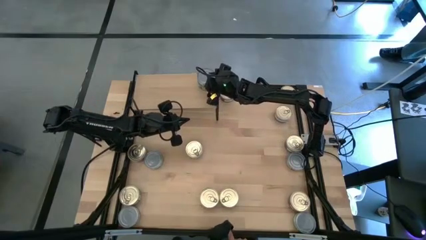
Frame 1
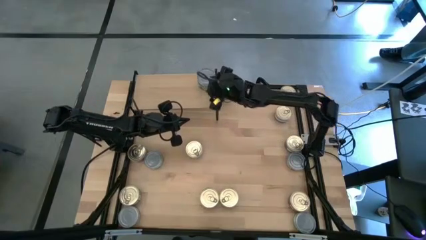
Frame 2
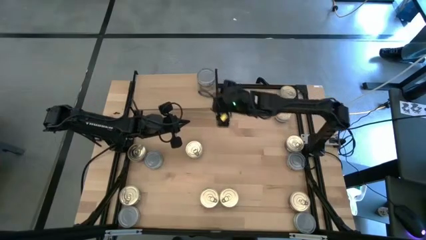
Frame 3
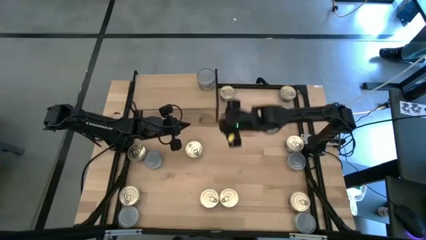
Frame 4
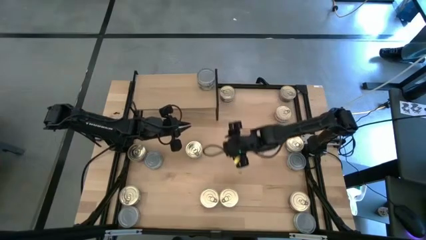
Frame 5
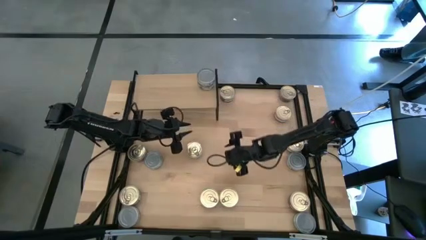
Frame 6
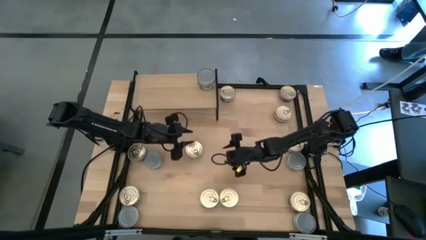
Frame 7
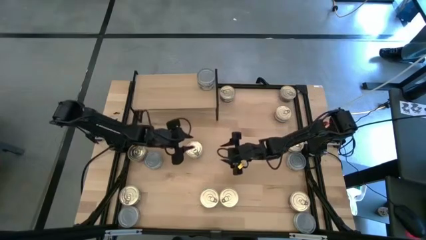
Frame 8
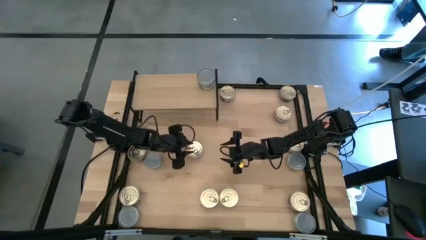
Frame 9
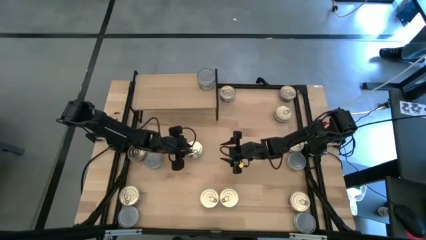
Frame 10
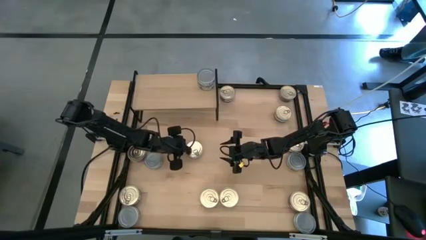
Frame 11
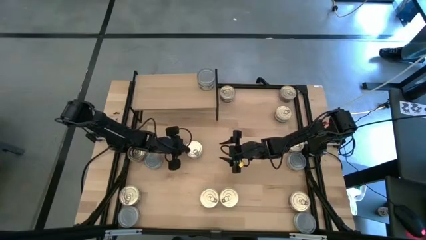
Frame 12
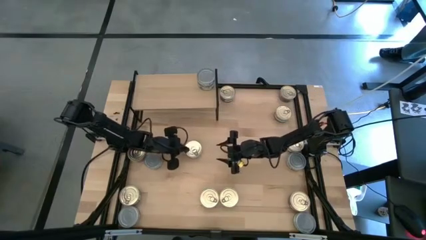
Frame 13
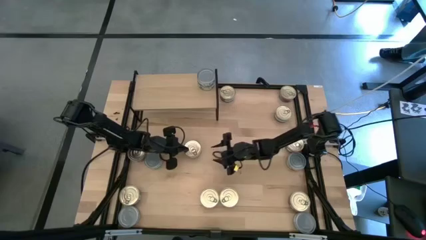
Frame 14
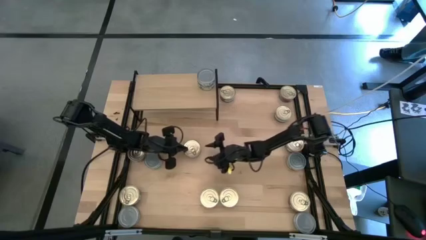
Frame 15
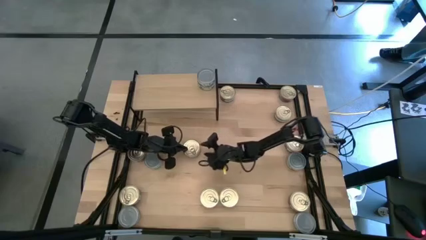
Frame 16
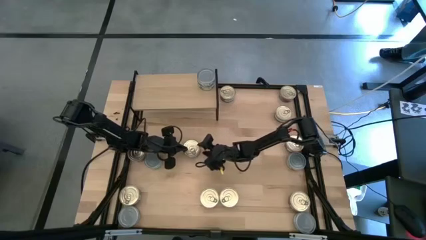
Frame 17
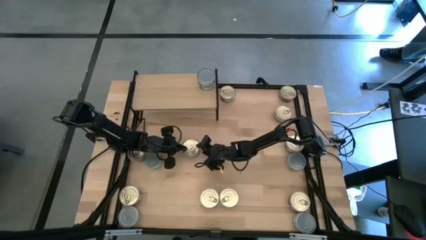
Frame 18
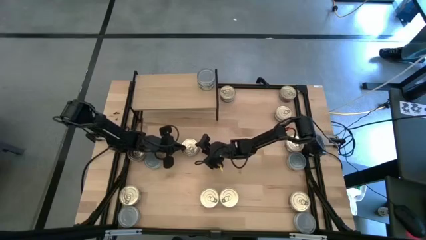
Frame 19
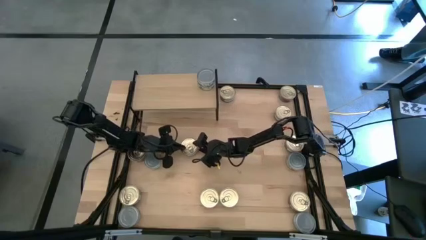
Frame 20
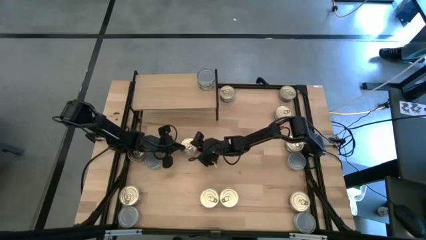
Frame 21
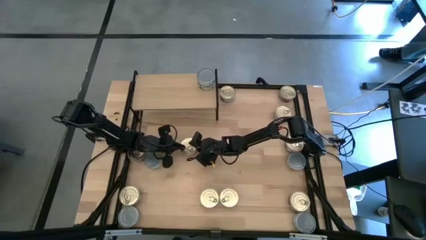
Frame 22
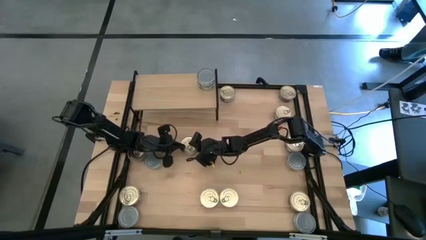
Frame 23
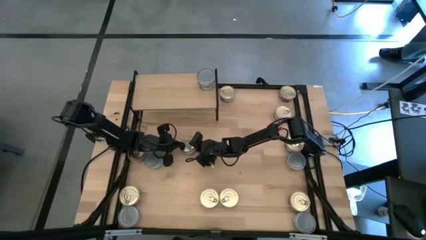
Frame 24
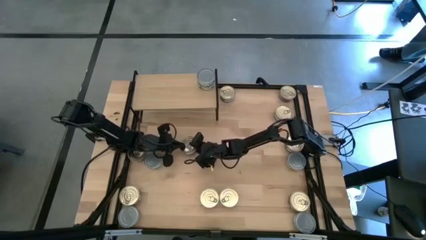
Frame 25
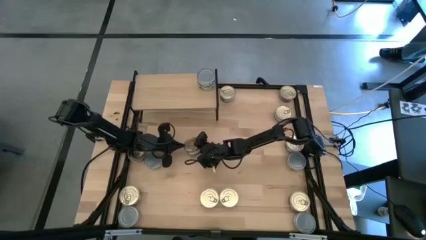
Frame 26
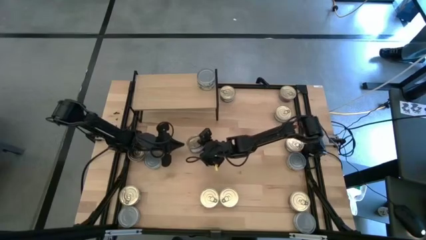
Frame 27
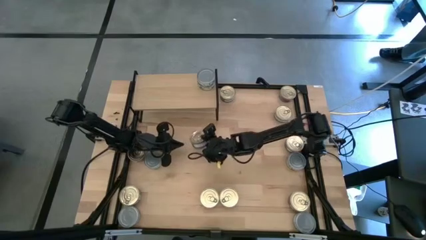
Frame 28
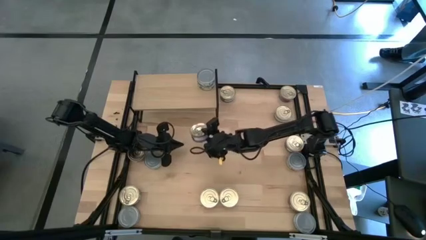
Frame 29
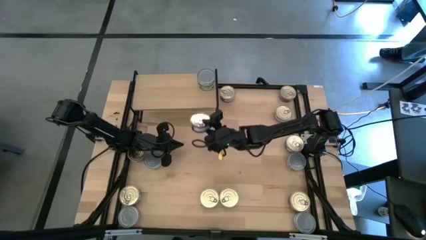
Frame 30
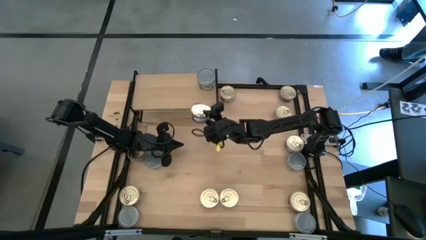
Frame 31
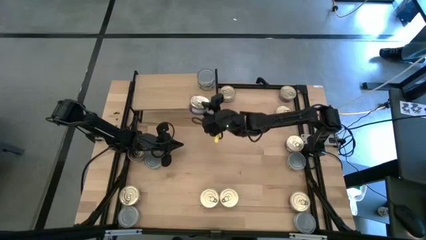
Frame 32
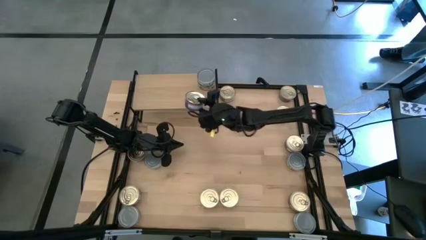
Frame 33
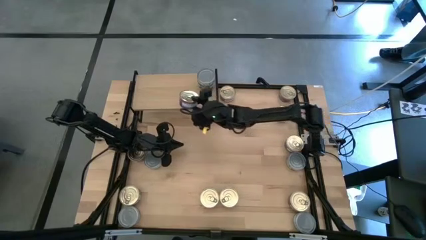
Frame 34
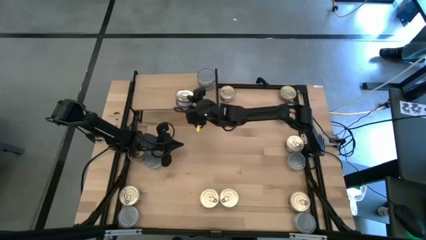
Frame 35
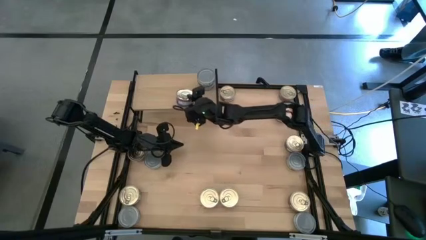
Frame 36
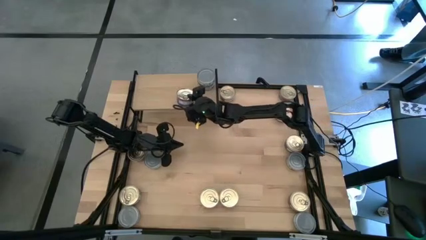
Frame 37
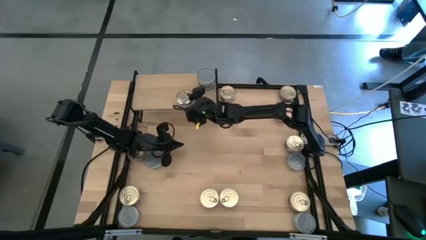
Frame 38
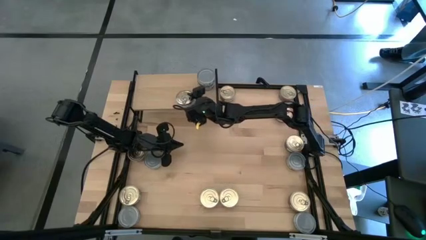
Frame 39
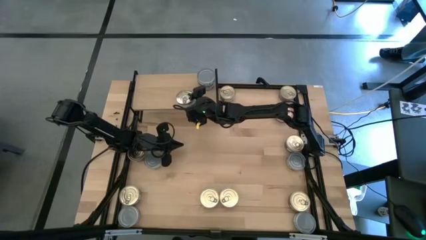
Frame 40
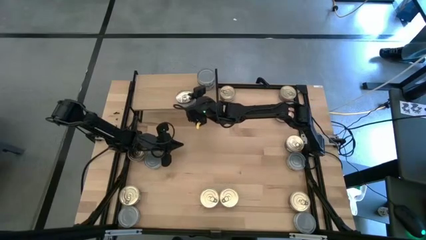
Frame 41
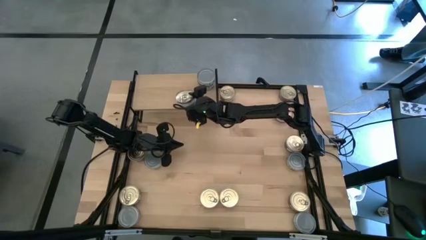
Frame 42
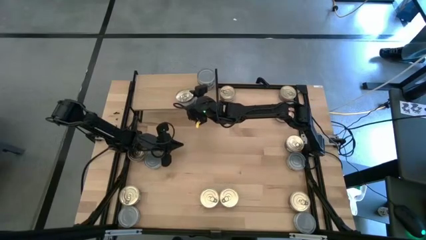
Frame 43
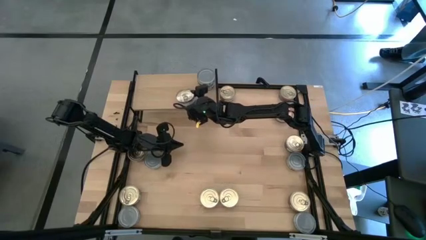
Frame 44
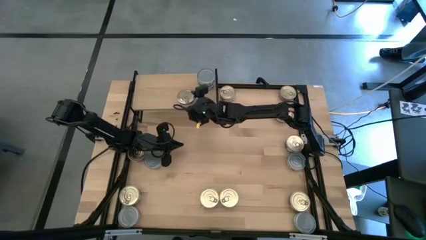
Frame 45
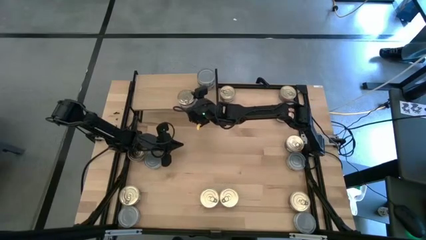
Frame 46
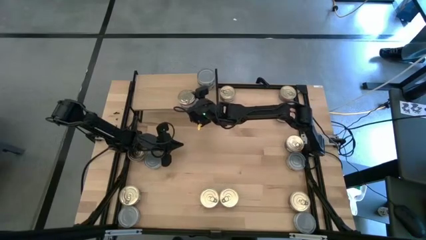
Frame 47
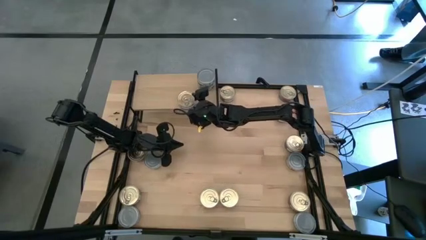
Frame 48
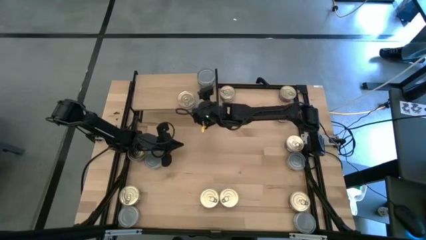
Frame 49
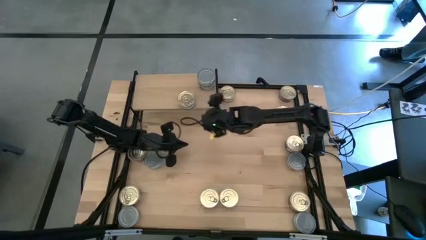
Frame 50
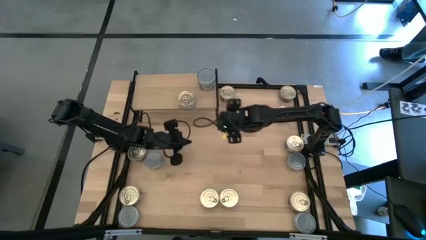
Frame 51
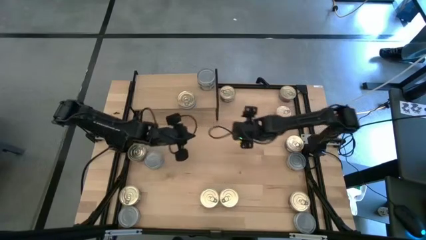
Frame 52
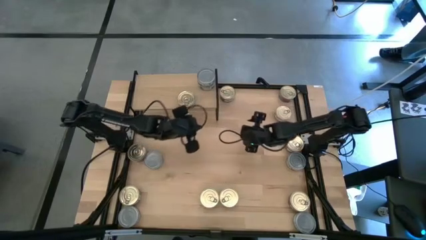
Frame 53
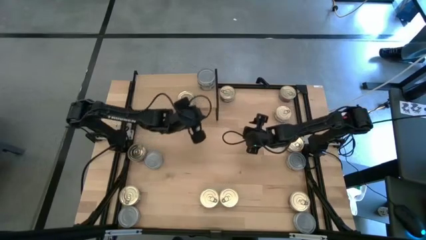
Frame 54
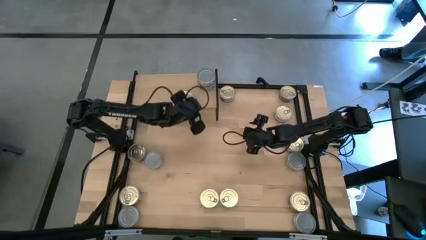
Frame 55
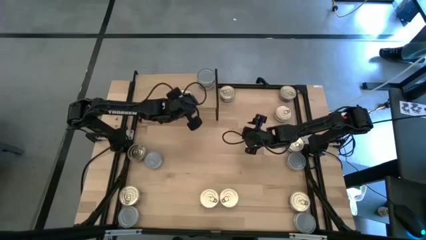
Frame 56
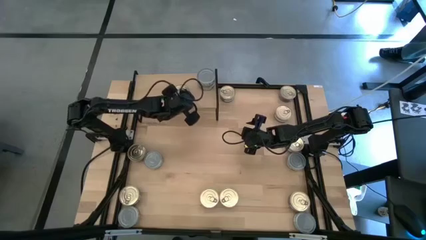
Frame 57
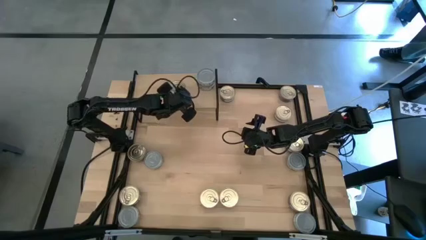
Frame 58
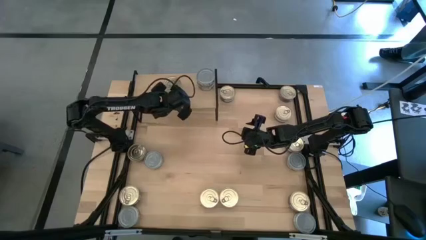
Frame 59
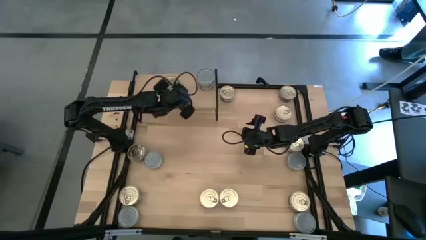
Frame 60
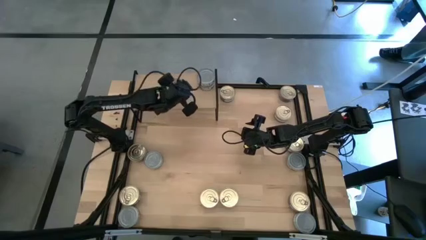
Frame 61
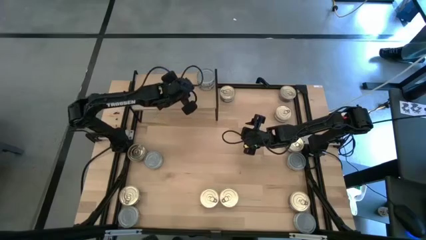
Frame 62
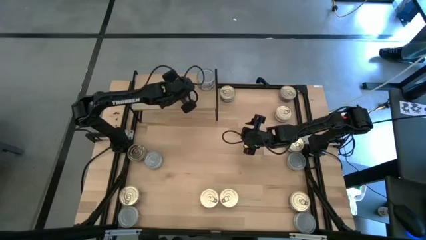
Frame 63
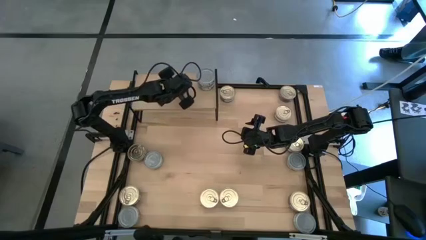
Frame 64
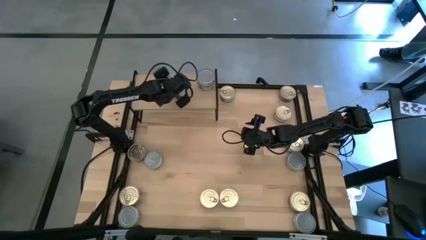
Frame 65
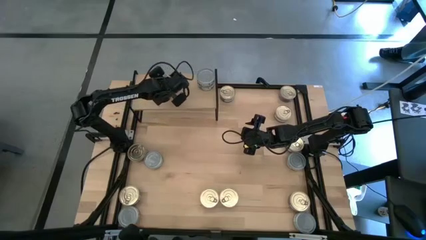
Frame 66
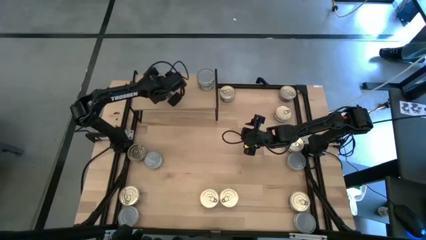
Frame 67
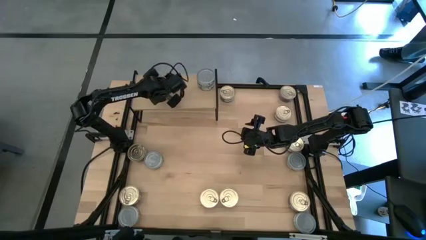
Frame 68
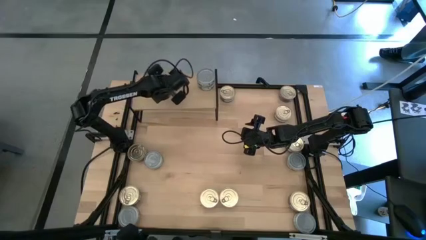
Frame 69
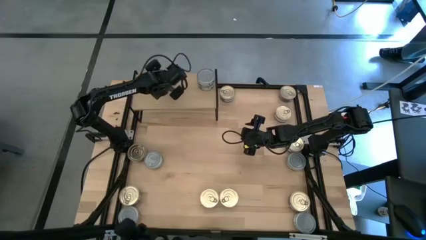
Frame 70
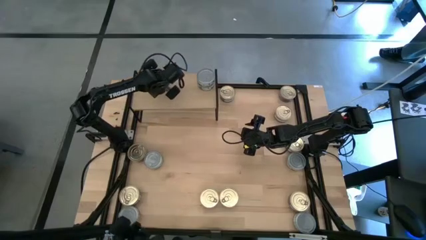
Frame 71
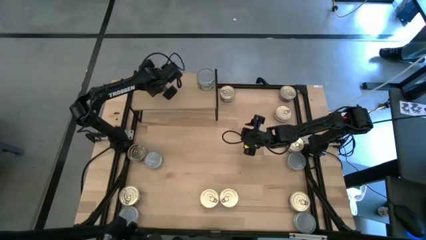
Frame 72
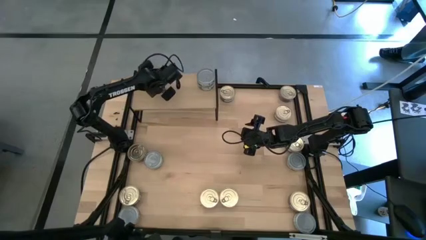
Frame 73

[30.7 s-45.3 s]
Task: Stack canned seafood by type on shelf
Put the blue tuna can on the shelf
